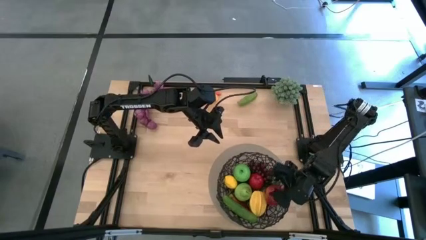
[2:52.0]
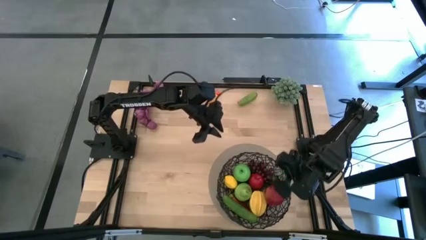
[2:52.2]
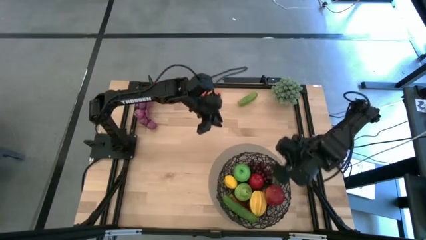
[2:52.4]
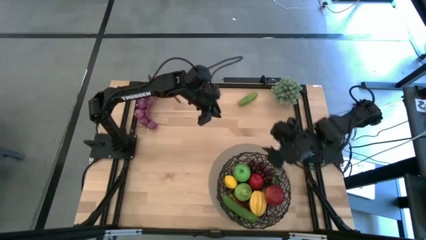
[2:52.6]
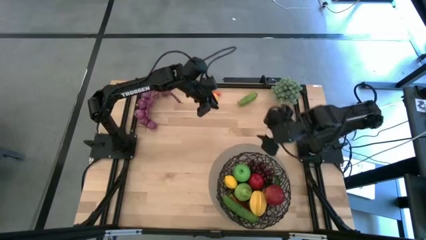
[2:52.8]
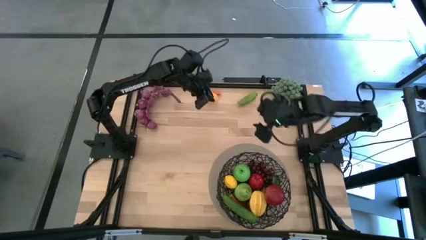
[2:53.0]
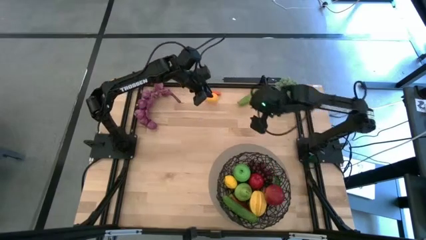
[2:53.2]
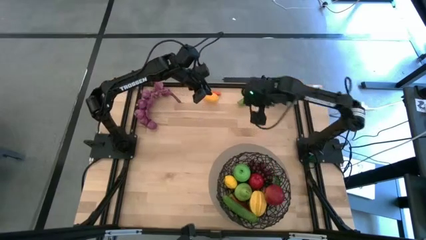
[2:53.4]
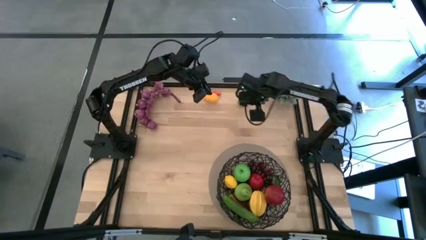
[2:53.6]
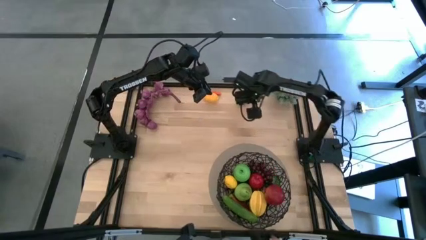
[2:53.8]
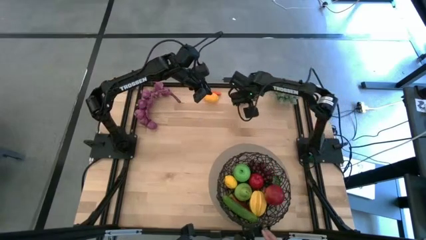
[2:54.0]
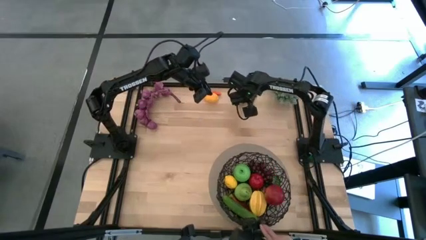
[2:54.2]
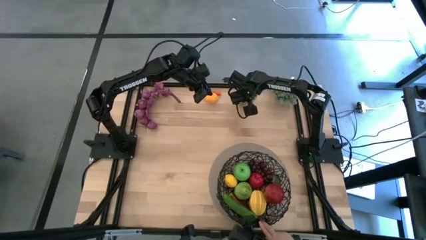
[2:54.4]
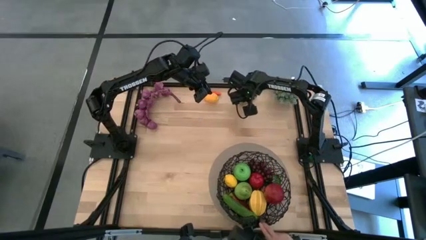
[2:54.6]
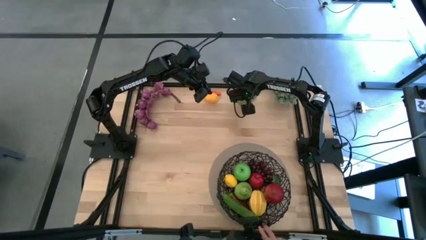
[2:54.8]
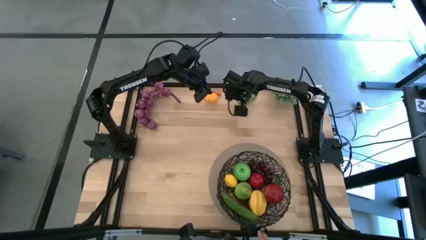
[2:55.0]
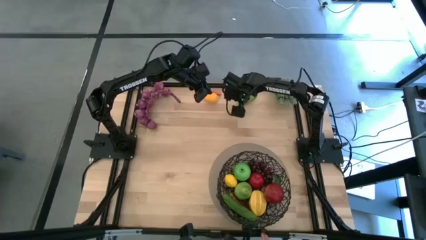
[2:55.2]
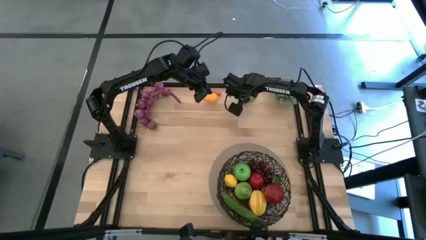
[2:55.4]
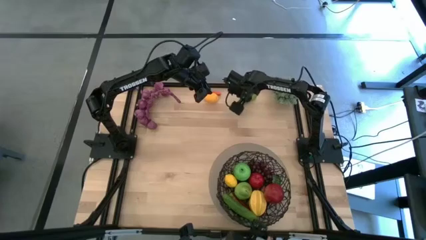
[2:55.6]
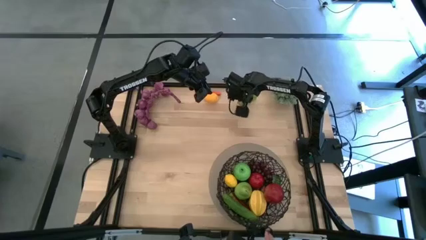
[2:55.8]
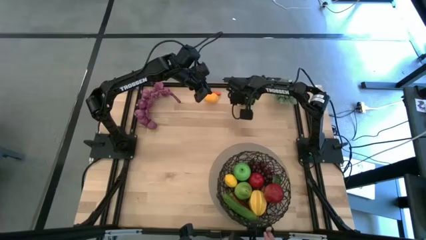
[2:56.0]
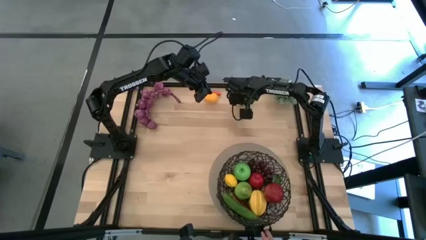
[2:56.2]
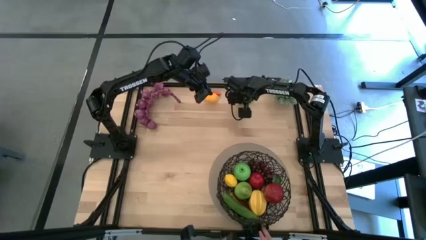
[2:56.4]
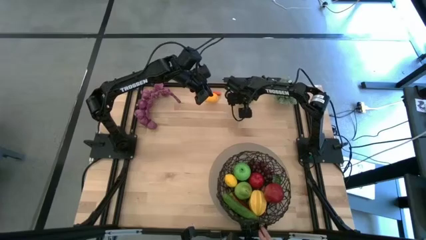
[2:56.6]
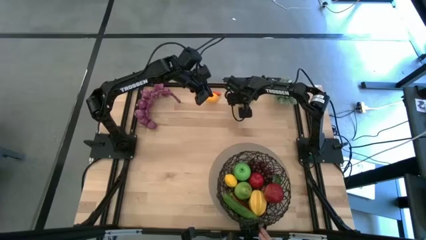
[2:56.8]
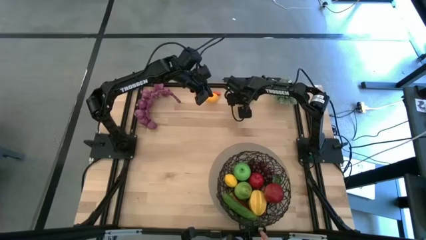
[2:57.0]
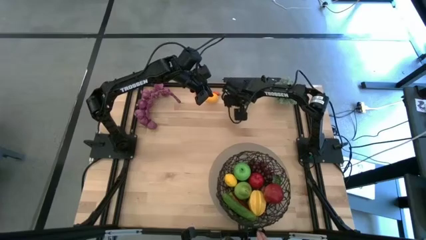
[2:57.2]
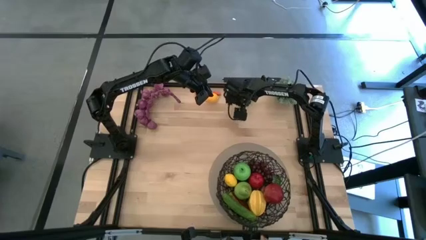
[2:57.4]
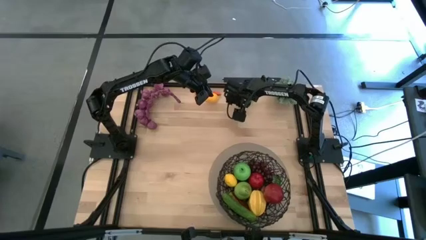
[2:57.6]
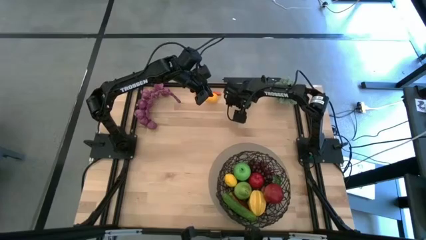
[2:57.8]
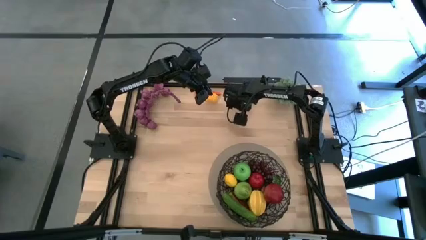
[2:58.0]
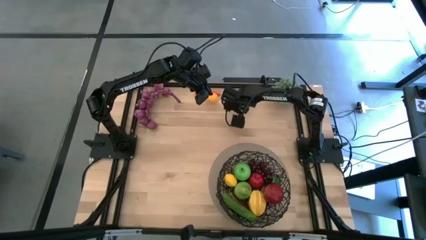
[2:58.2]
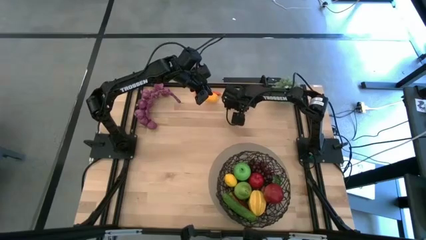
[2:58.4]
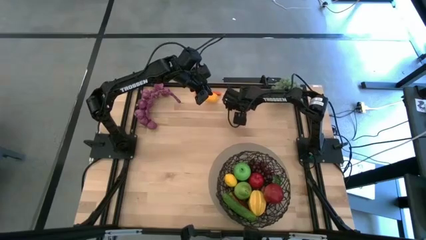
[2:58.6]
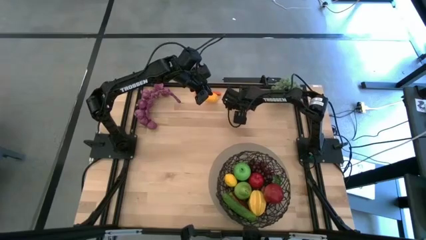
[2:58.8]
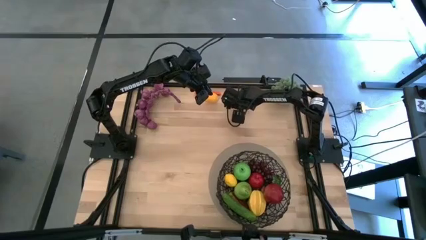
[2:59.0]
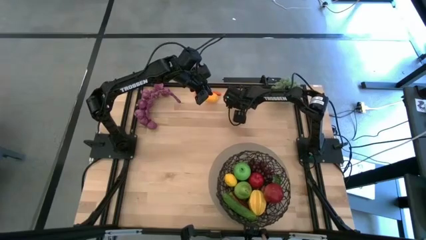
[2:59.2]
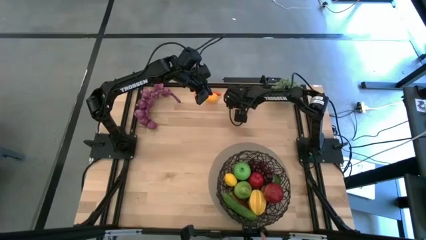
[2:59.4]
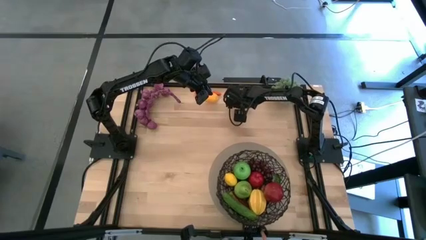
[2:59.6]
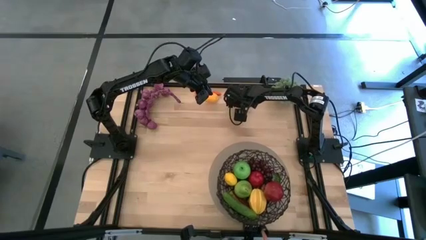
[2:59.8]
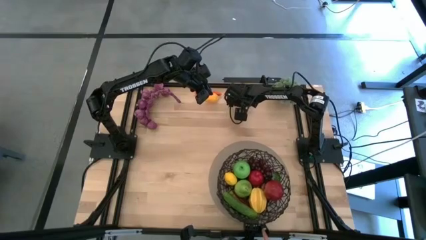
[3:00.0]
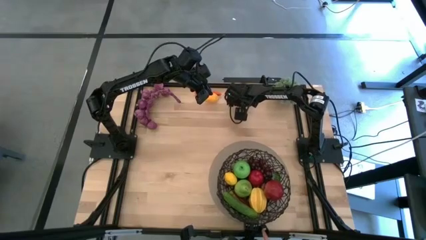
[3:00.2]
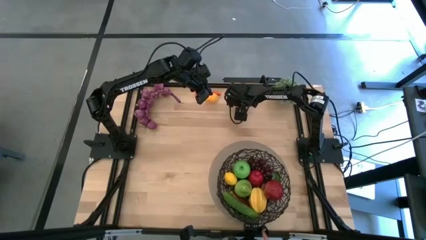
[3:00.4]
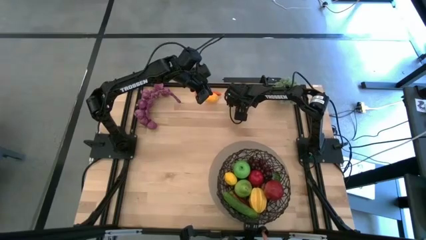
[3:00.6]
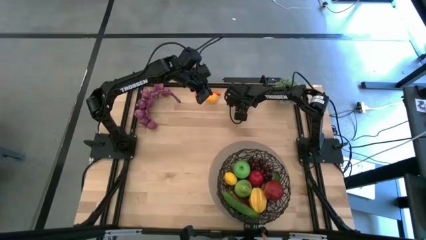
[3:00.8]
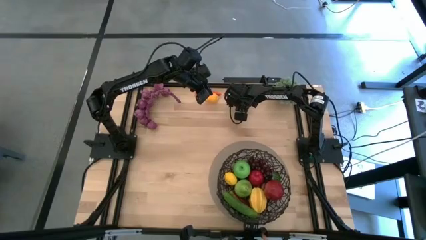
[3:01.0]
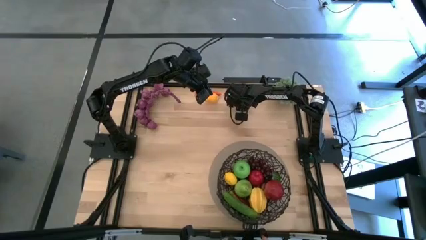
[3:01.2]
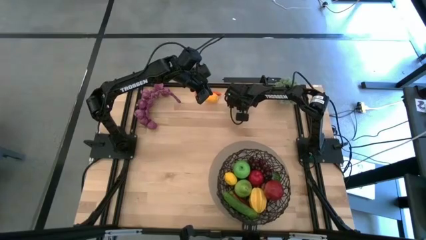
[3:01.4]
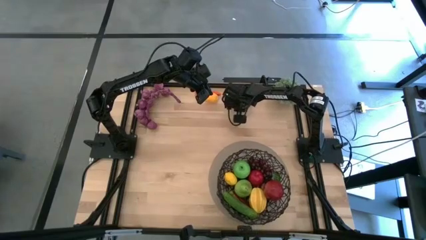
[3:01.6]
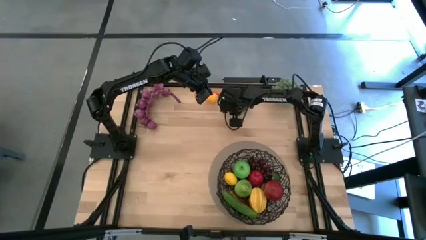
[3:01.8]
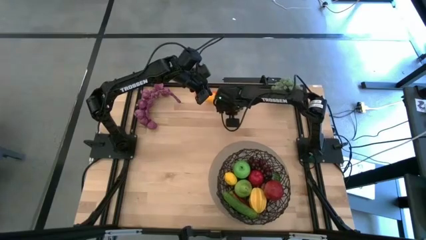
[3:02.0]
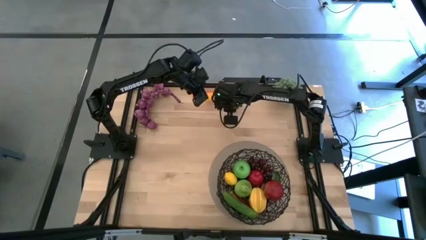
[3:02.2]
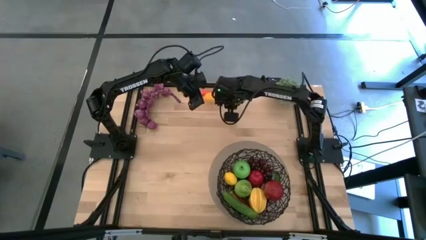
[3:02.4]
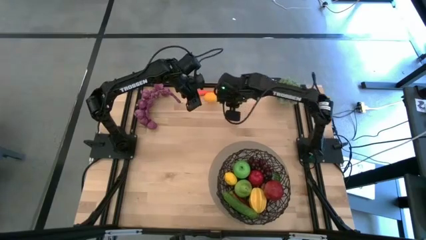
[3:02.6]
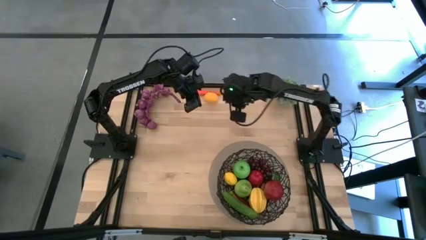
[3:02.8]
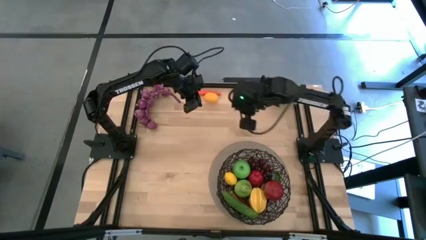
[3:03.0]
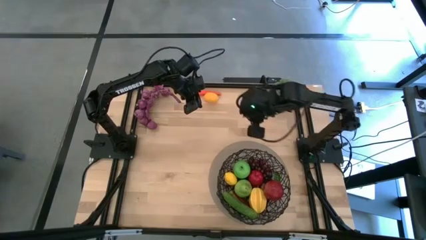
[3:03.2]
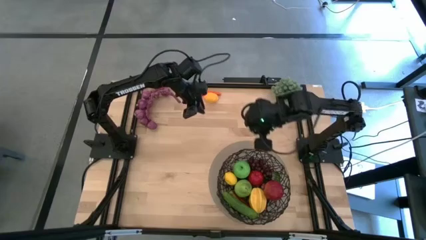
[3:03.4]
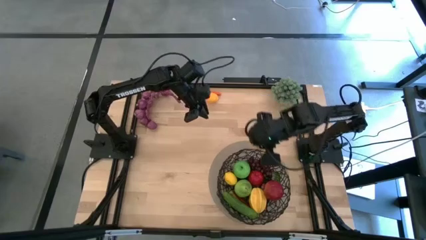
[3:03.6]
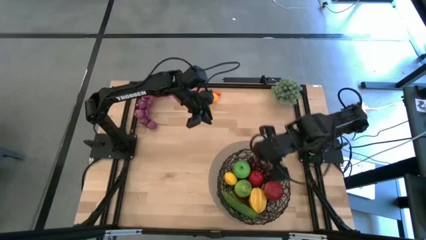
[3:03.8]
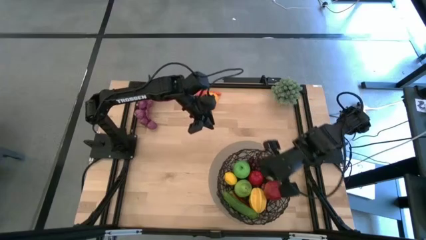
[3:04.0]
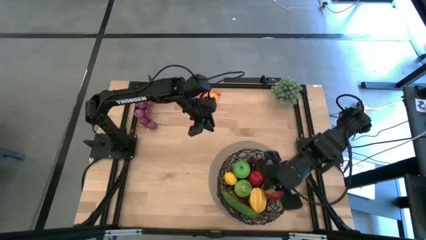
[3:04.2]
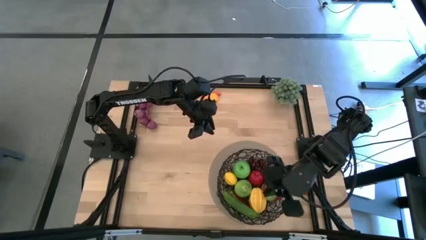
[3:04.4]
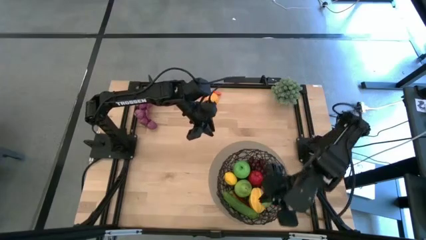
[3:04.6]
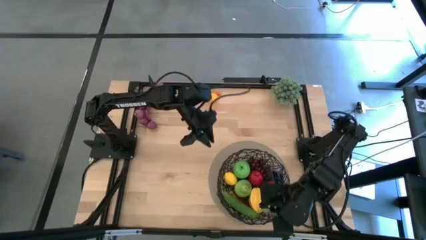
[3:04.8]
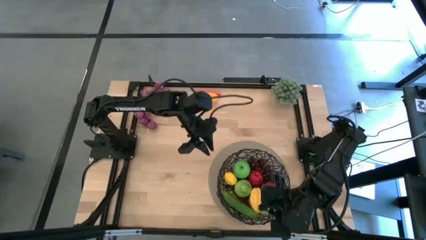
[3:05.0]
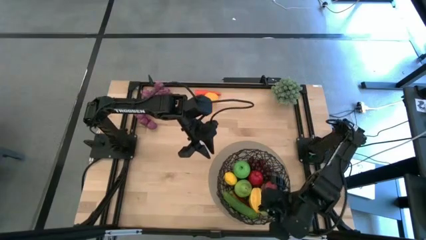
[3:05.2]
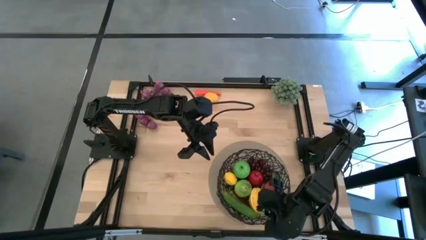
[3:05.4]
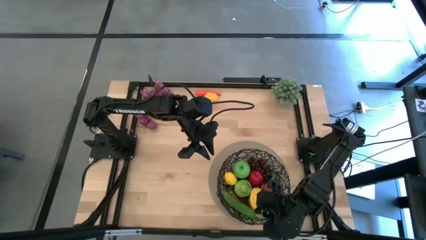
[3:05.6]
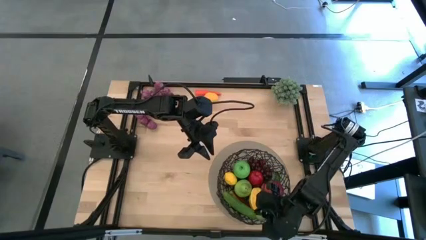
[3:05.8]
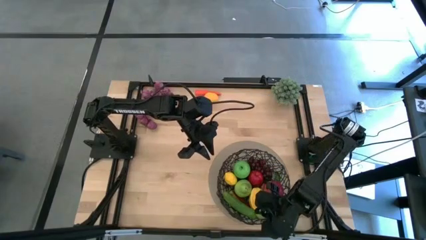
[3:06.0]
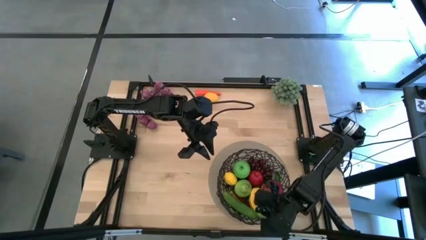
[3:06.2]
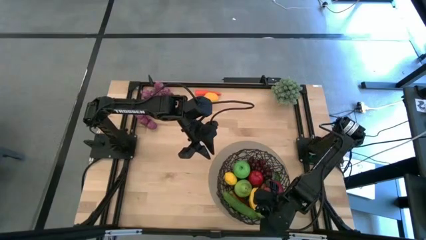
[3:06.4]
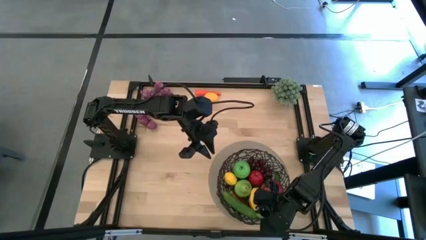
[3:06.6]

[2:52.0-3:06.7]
Task: Build produce basket
Put the green cucumber into the wire basket

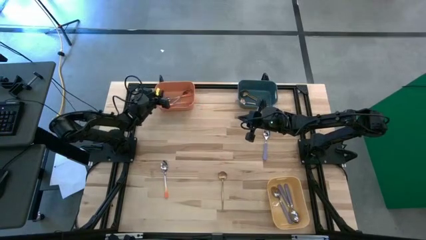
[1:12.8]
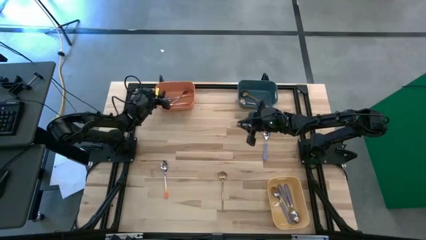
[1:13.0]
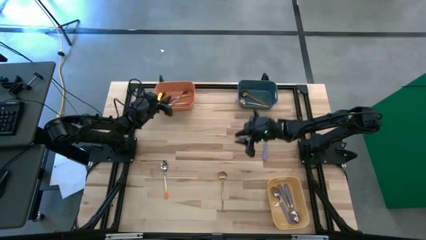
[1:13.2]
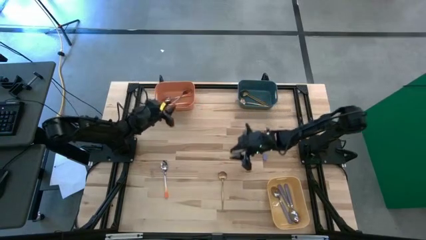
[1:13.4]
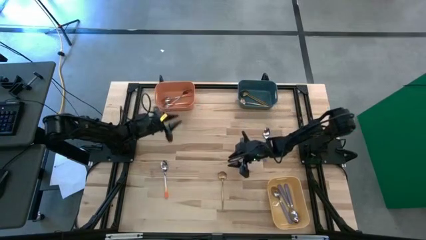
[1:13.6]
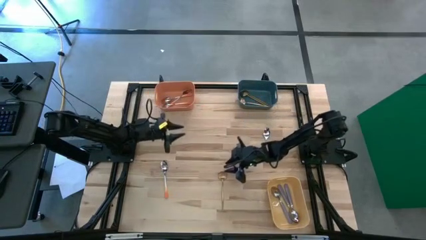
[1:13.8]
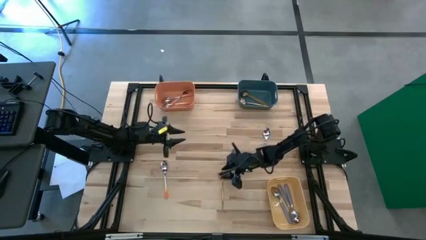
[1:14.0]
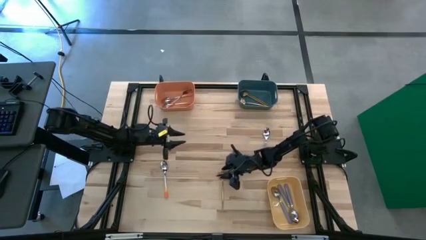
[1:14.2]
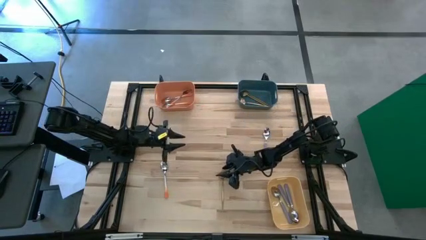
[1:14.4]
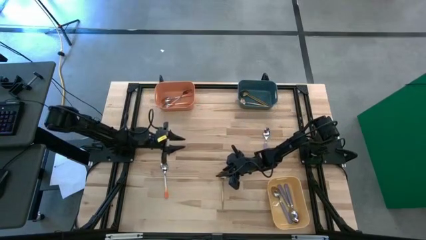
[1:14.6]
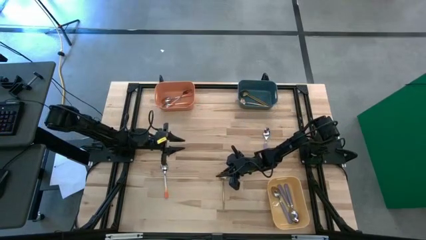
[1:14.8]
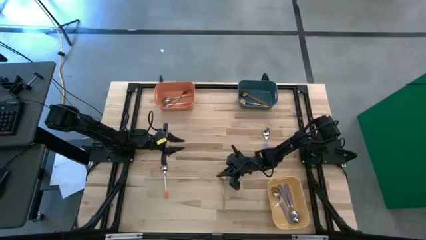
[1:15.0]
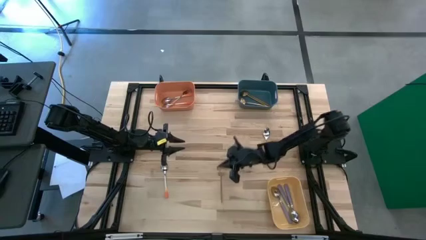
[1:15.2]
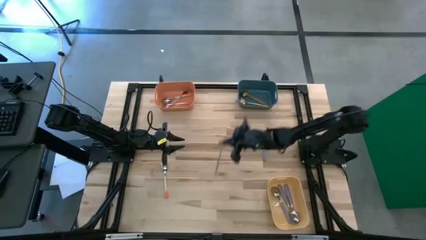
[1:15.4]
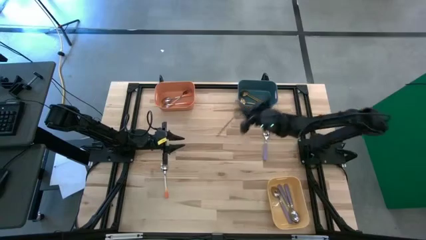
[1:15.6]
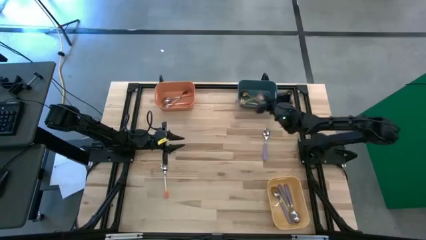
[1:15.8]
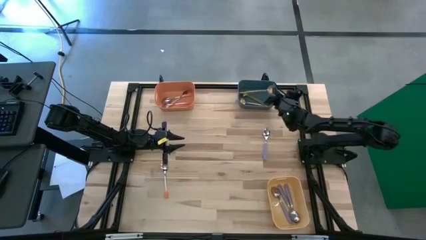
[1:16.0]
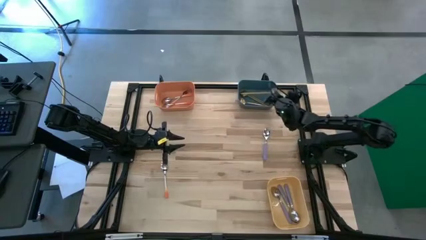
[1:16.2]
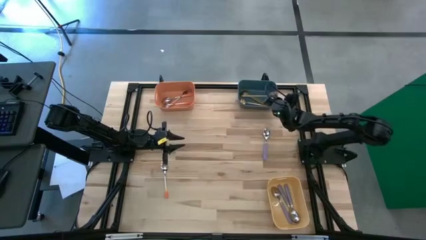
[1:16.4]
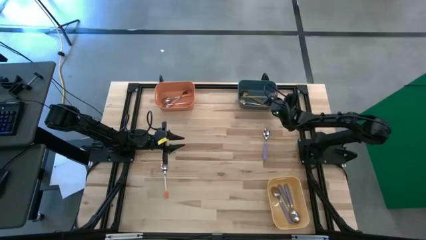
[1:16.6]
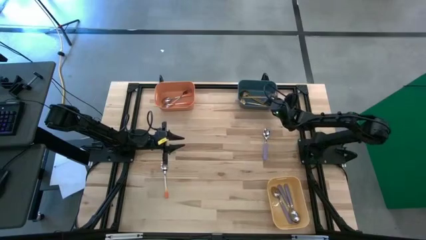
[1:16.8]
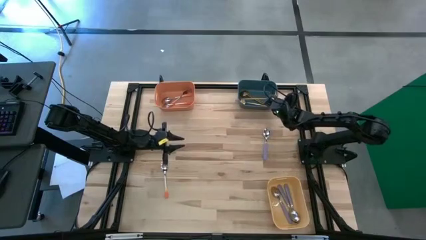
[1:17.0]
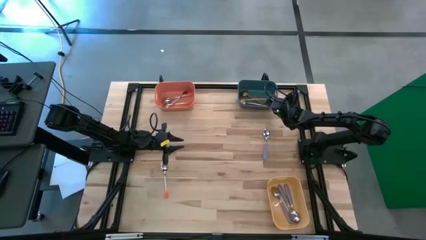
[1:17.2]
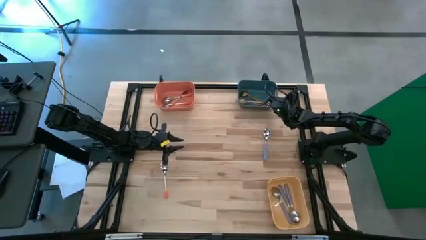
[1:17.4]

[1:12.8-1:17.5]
Task: Sort silverware by color (type)
Put the gold spoon into the blue bin
